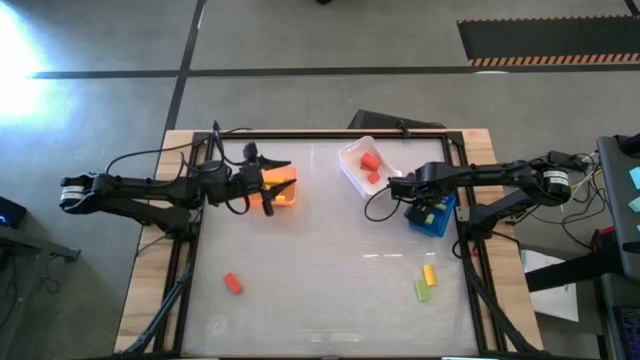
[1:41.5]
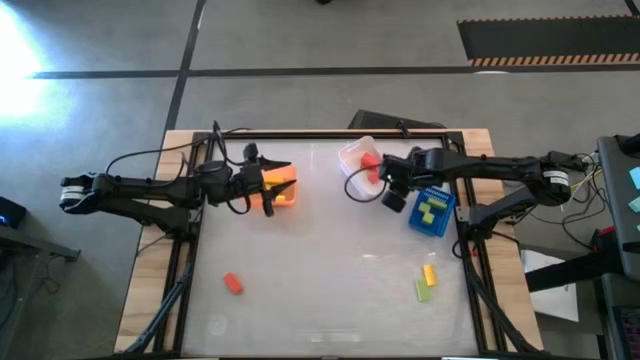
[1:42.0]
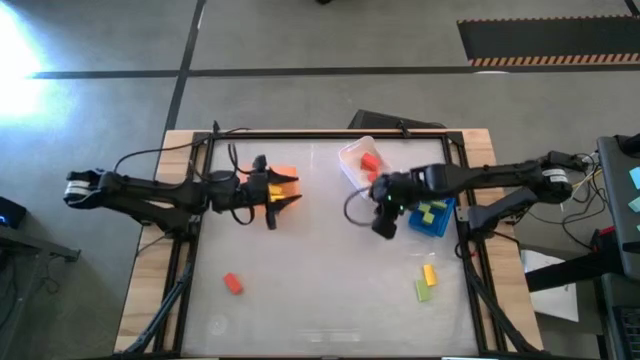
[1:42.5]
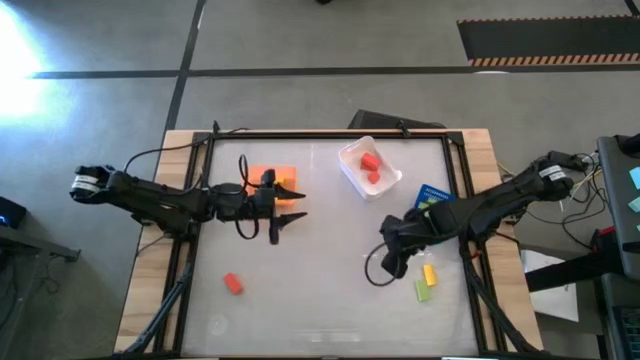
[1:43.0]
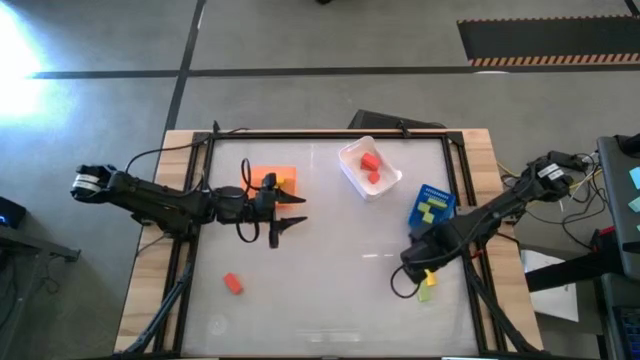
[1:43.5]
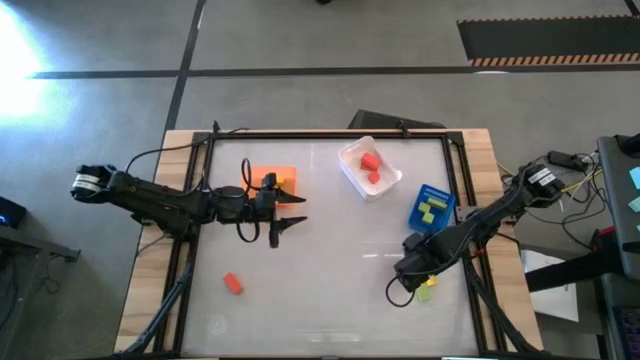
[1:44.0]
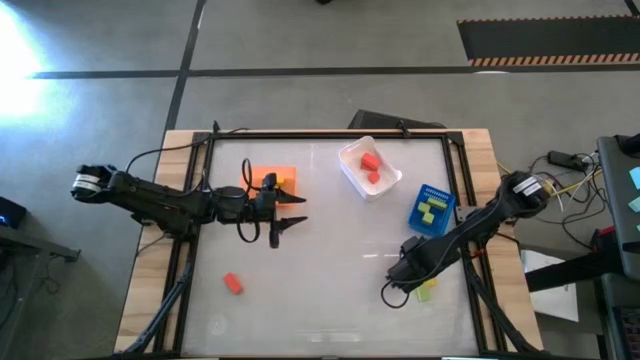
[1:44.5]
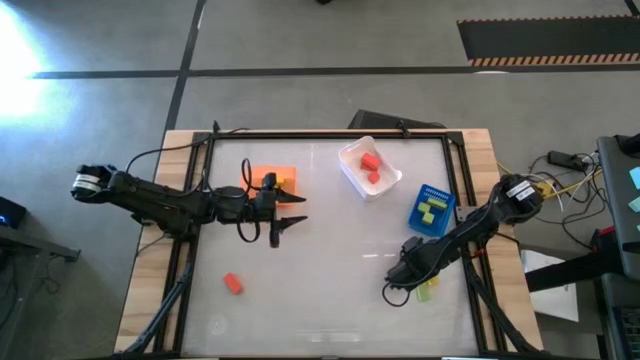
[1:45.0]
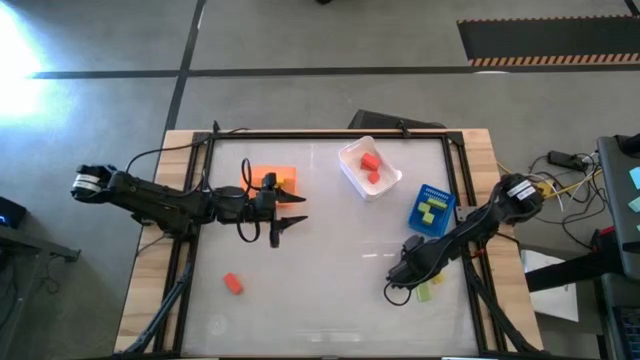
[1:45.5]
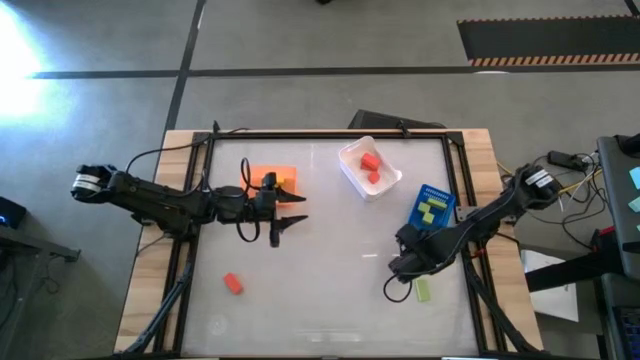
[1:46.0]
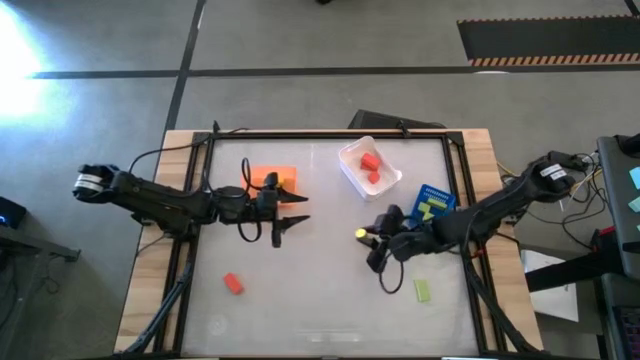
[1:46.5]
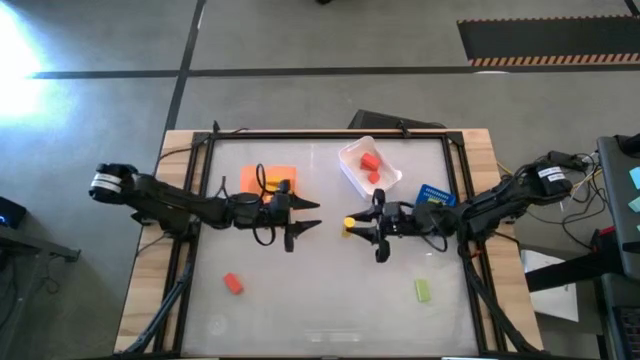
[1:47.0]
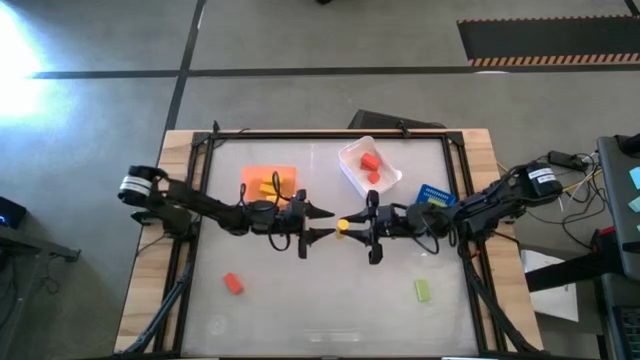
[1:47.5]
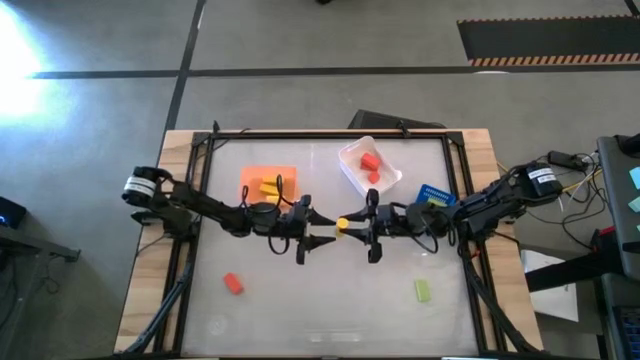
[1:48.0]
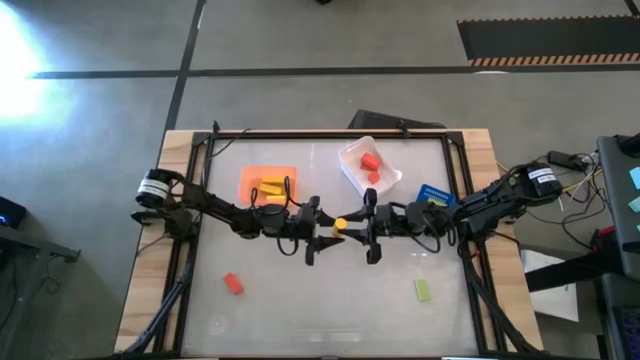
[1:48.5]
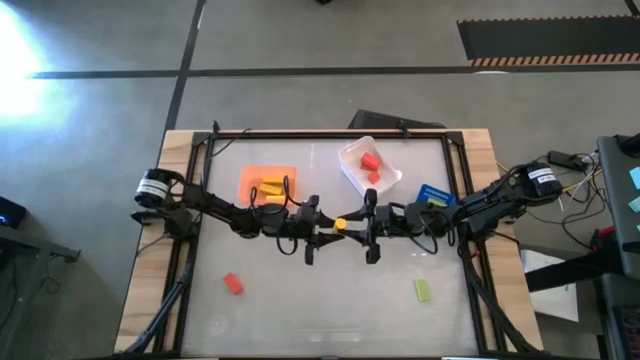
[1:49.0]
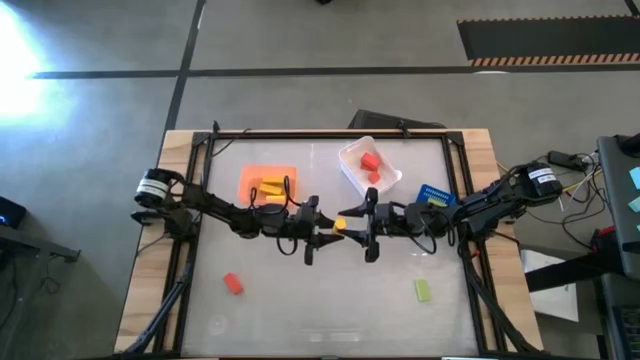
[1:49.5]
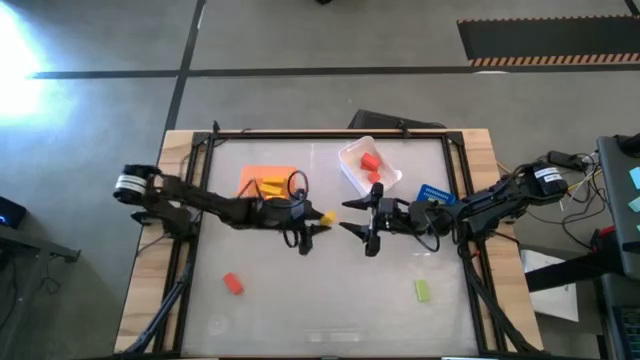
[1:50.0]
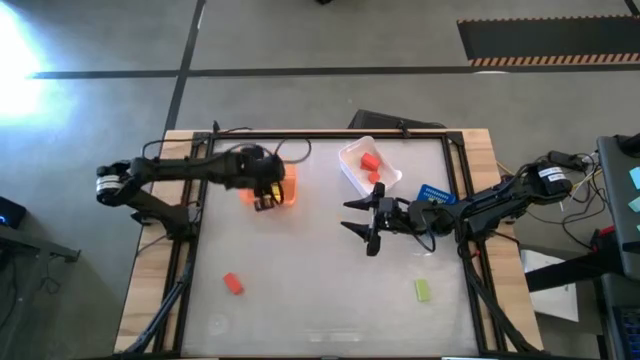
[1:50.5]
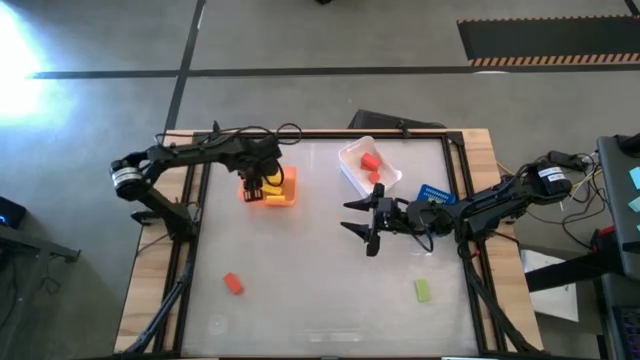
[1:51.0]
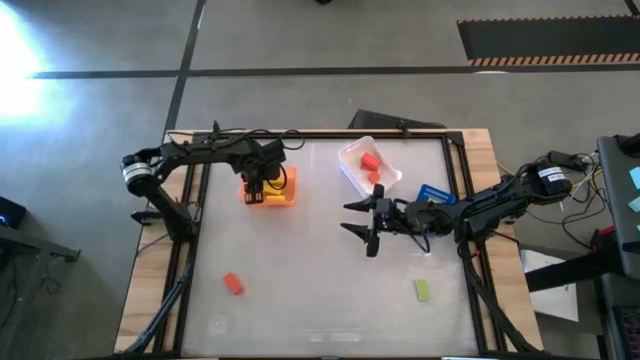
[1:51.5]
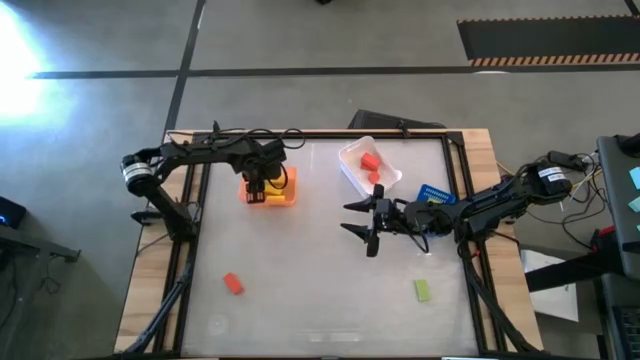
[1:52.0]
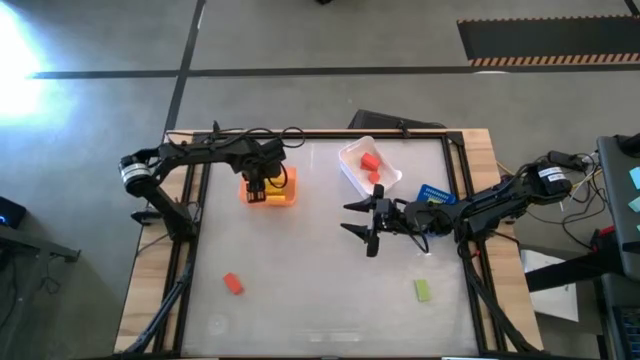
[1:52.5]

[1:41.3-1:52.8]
Task: Sort & place blocks by color
Put the yellow block into the orange bin

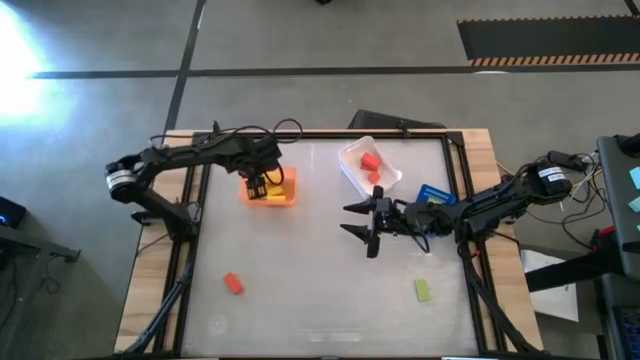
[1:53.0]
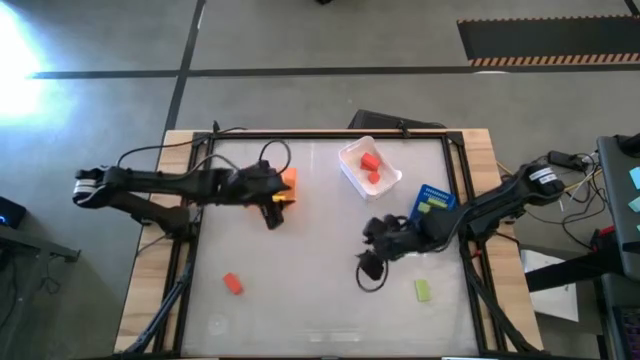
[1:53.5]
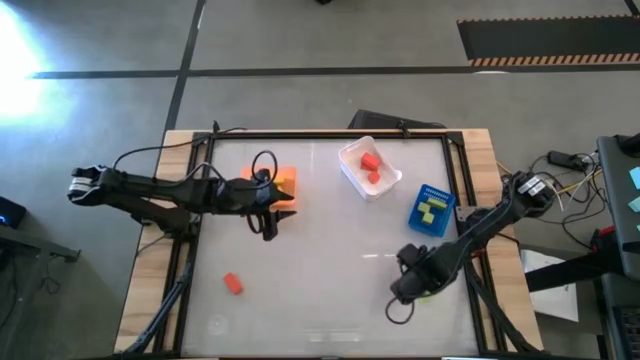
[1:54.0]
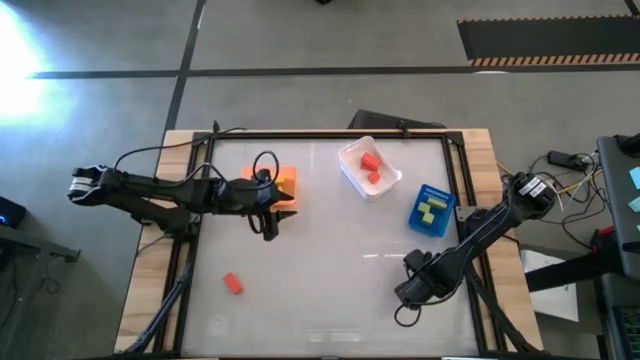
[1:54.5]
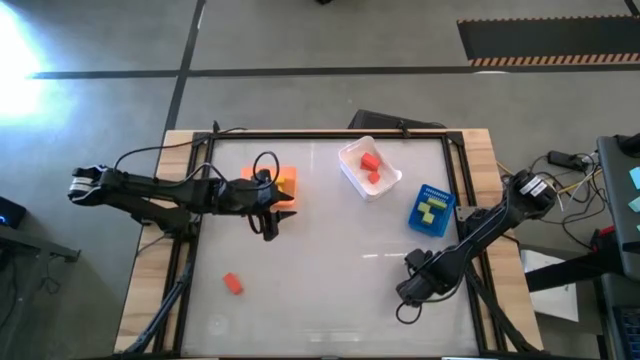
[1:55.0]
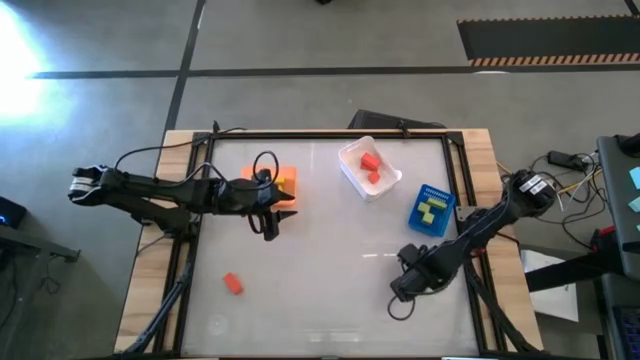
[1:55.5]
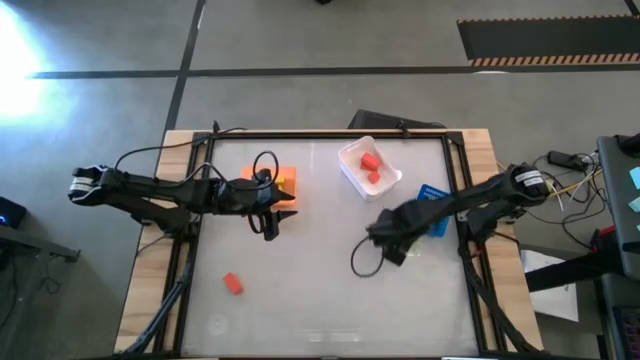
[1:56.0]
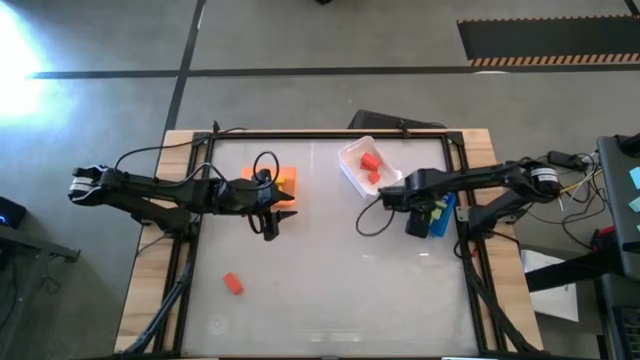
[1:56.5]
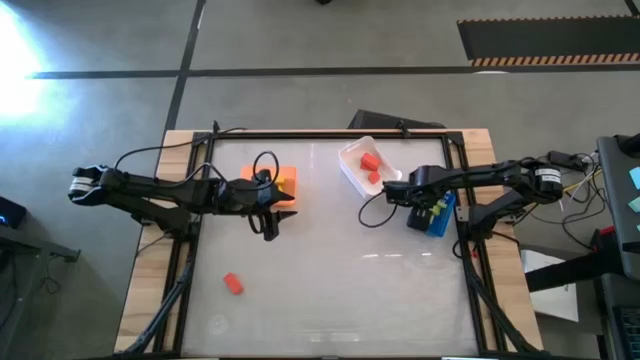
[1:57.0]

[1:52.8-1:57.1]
Put the green block into the blue bin

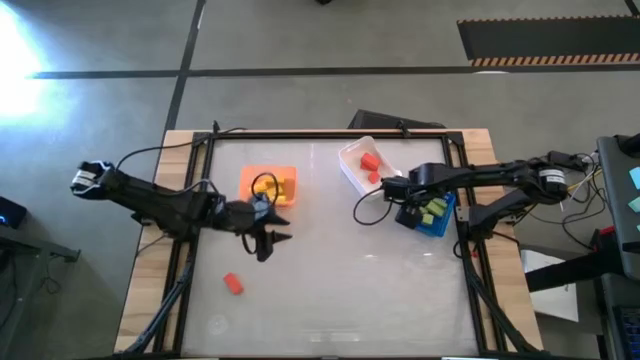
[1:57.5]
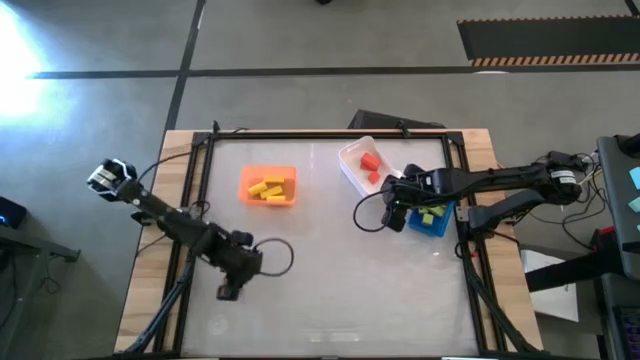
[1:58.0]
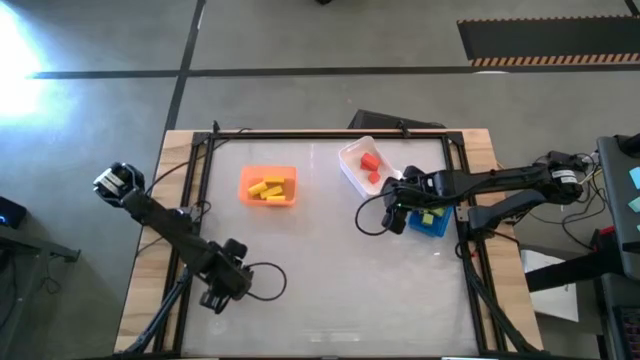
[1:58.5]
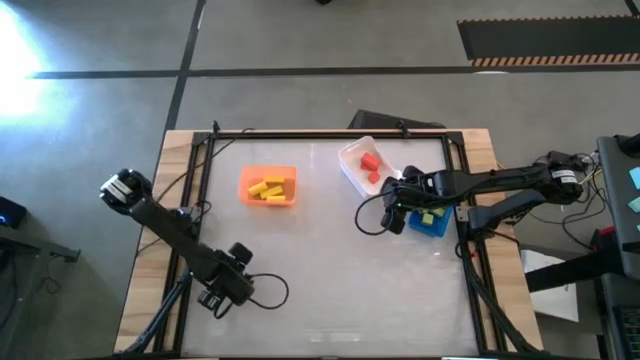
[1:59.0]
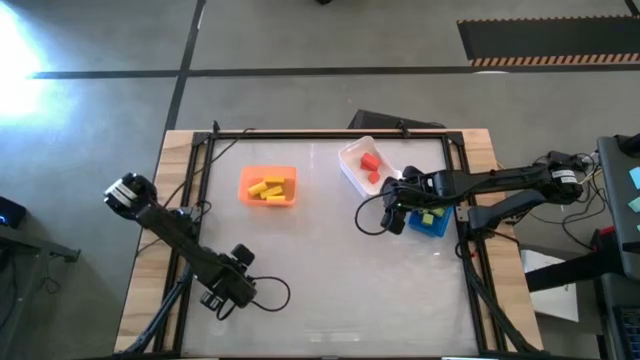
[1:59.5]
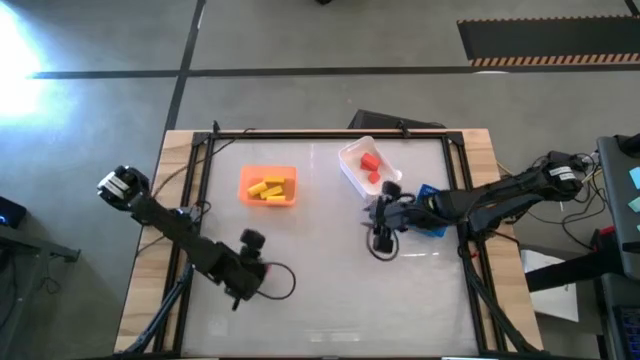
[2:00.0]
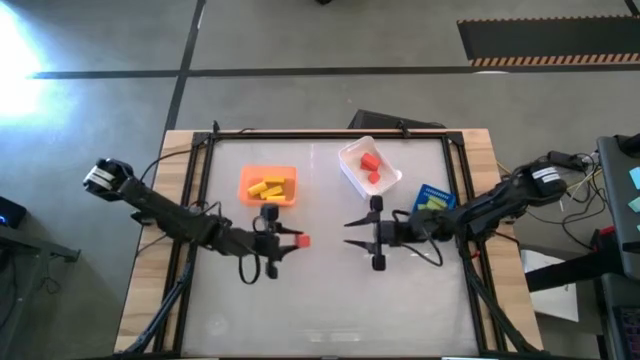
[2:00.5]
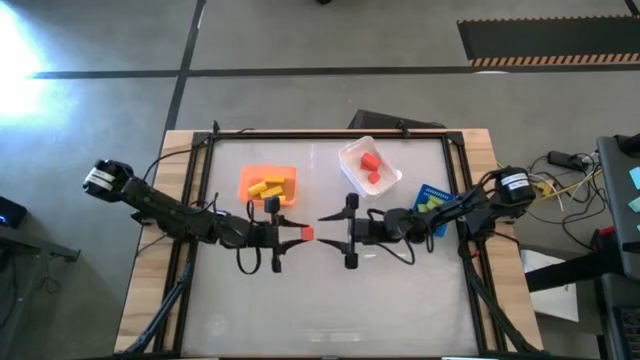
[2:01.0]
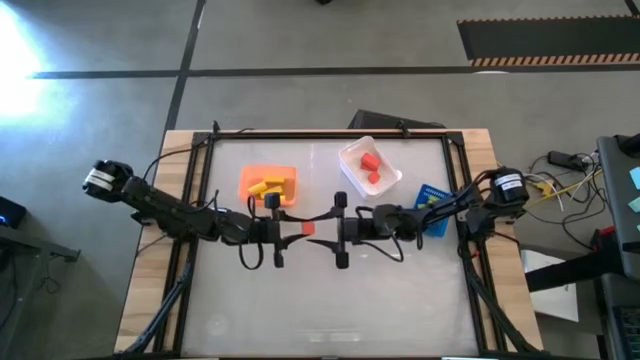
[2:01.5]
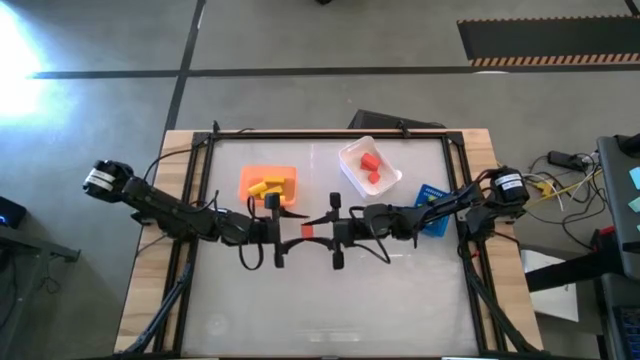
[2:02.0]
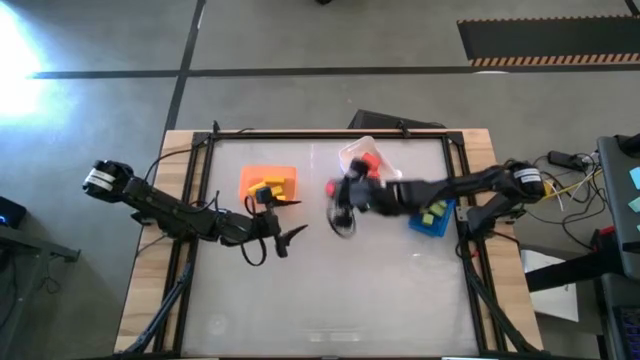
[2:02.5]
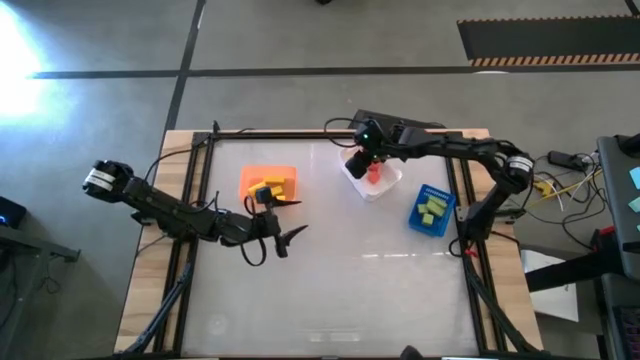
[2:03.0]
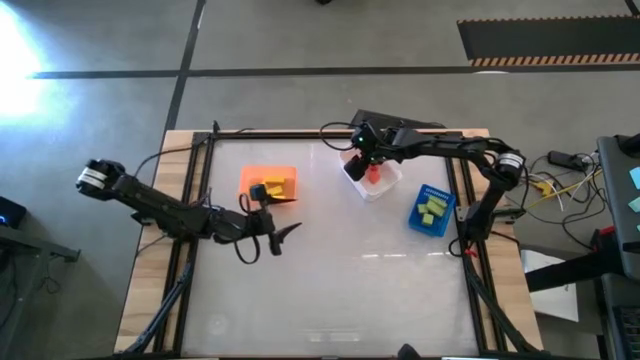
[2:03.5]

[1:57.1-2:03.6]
Put the orange block into the white bin
